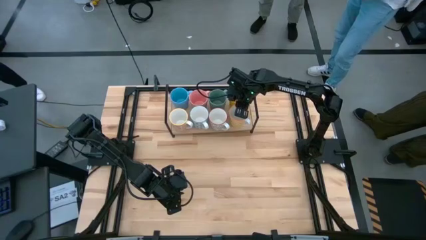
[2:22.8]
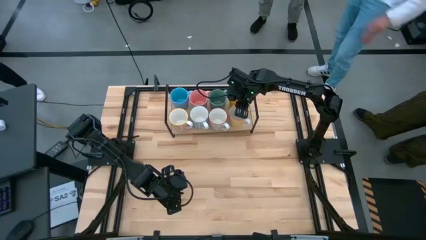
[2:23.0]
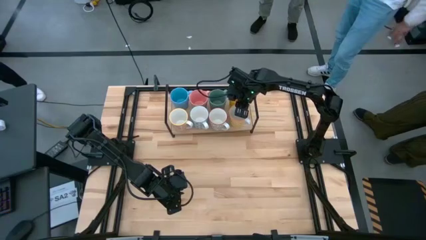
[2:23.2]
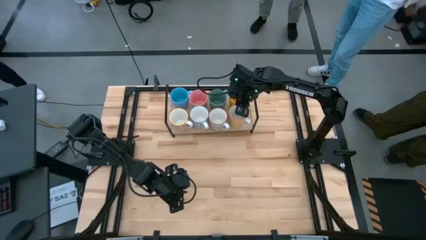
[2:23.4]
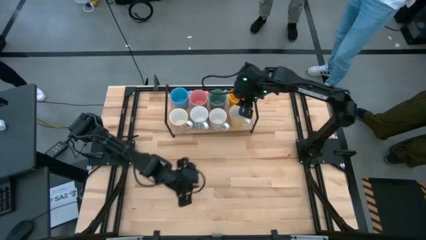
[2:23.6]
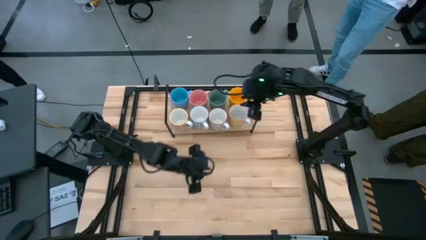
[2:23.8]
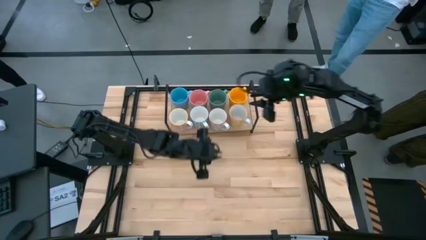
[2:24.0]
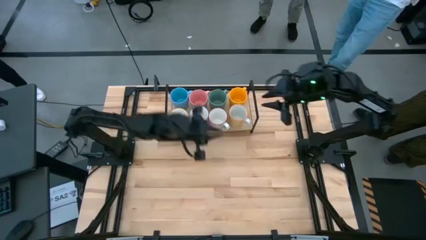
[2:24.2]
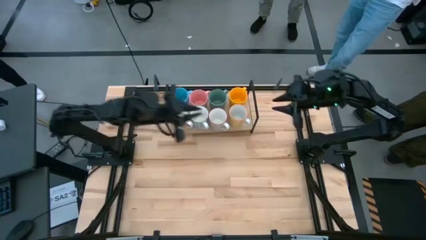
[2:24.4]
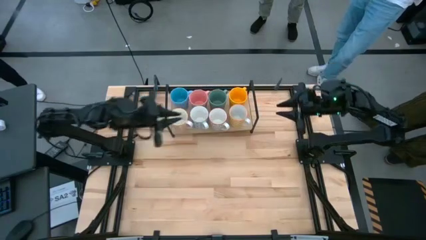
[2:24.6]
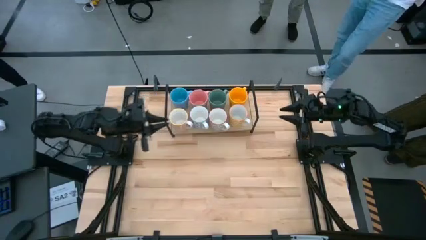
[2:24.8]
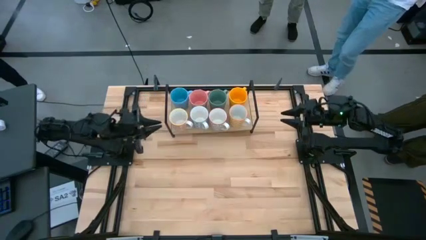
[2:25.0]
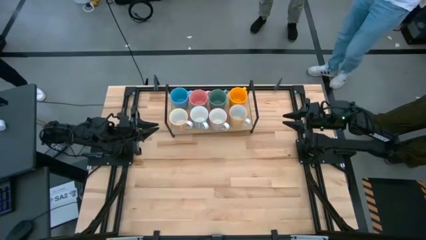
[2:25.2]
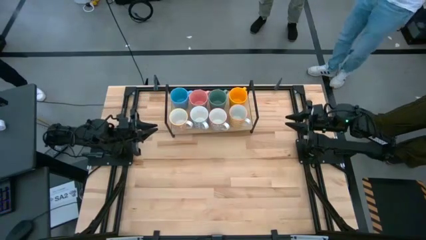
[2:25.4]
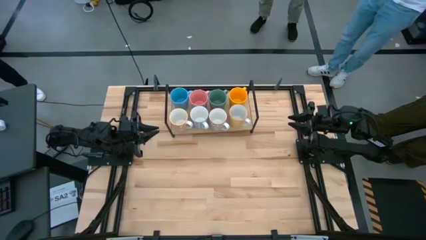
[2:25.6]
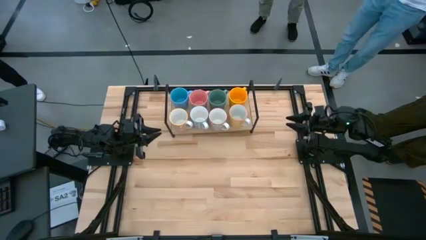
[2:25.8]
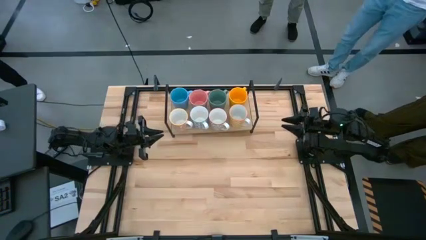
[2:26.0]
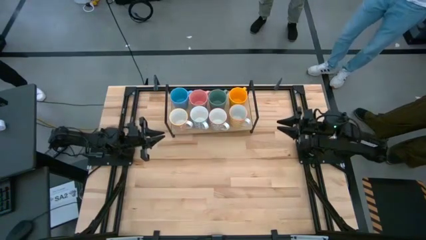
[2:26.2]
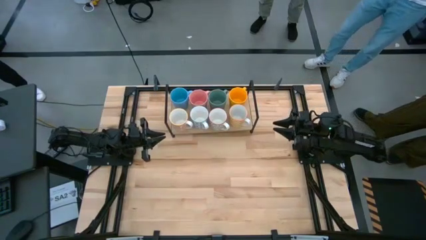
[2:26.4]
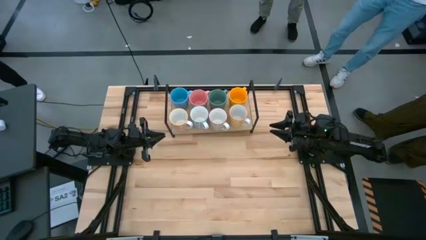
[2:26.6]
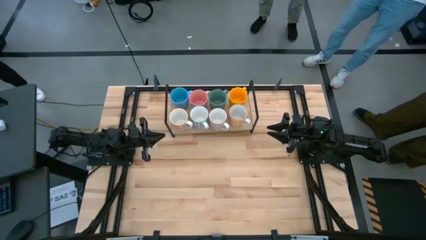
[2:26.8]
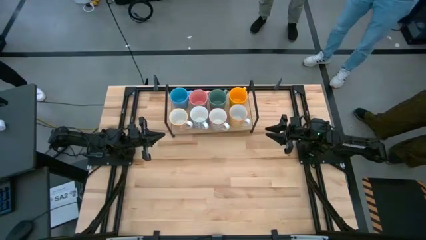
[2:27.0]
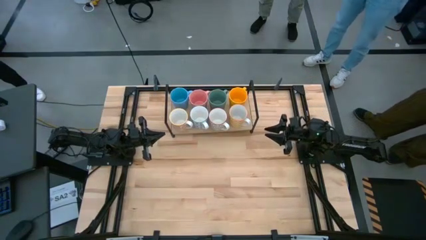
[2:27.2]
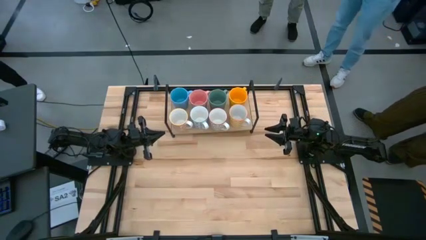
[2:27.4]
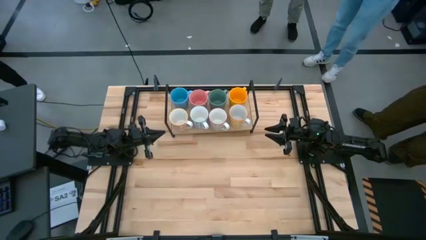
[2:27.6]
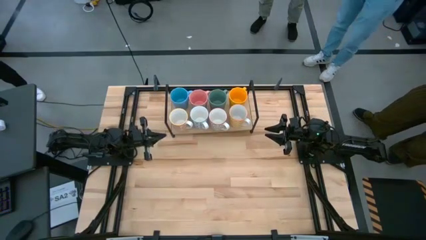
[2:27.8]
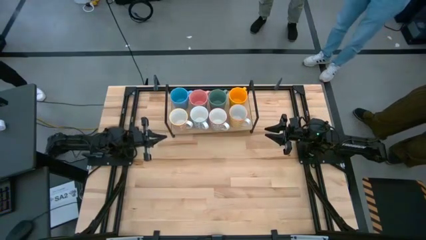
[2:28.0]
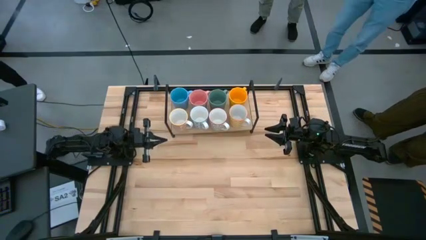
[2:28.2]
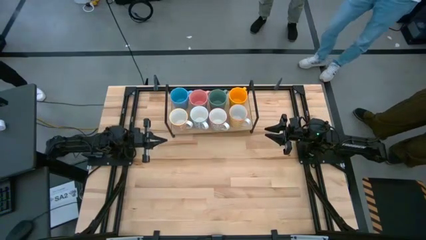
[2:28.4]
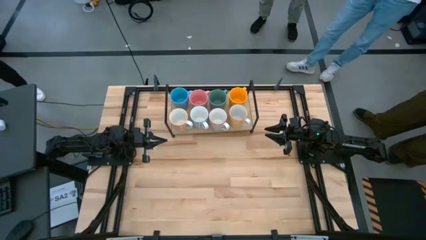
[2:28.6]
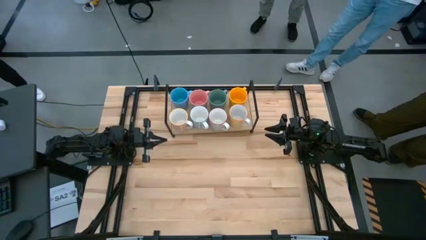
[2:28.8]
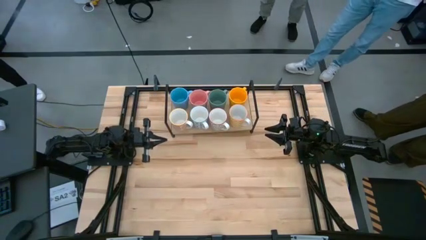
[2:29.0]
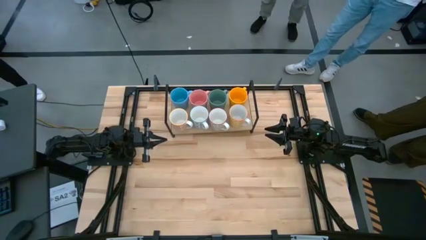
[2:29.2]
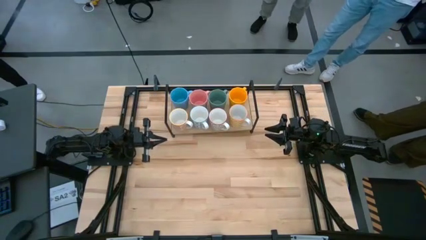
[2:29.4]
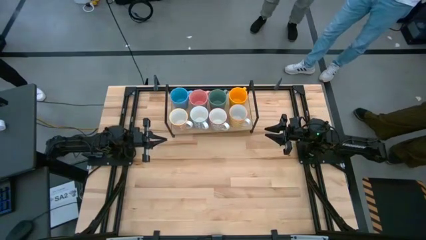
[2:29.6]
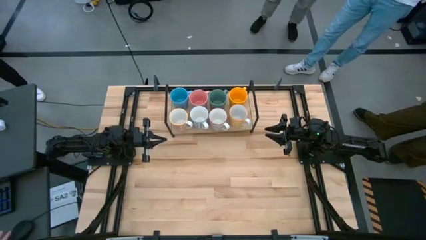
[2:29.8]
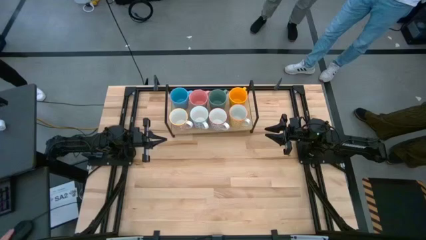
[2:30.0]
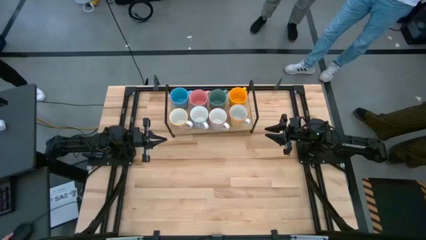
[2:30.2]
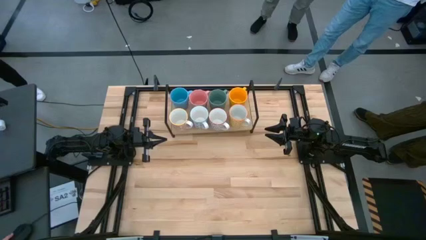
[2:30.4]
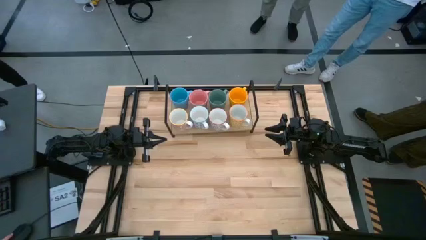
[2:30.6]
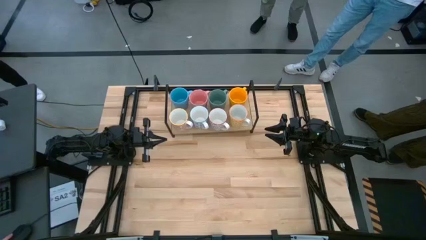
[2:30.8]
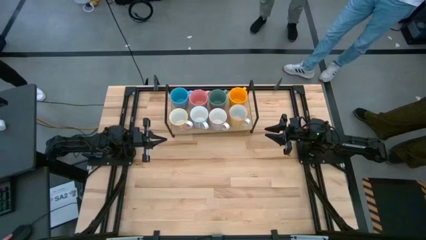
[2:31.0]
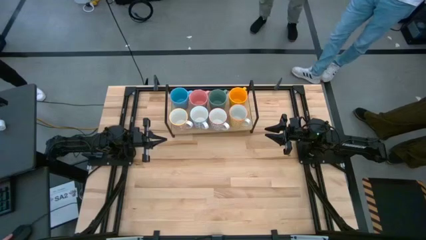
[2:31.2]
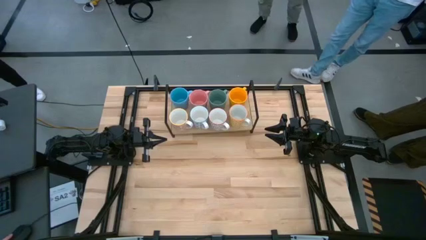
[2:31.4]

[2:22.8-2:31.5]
Task: Place coffee mugs
Return to Home Position

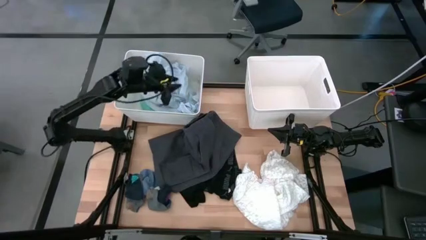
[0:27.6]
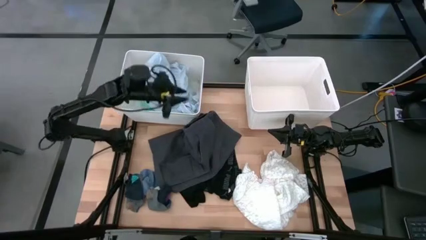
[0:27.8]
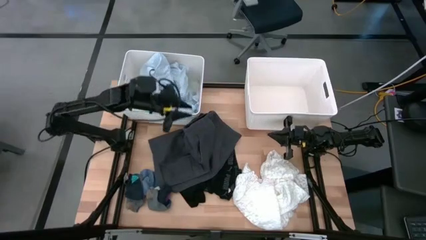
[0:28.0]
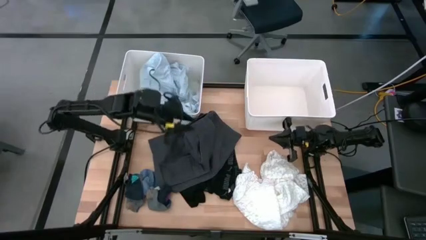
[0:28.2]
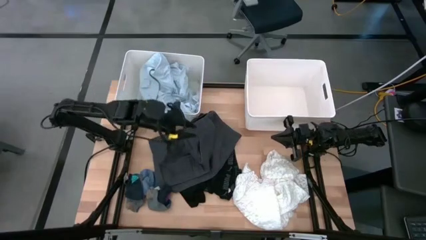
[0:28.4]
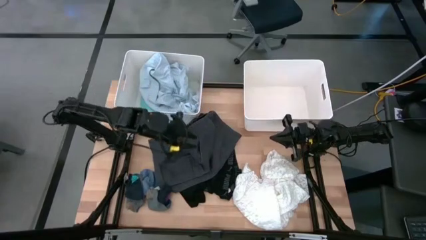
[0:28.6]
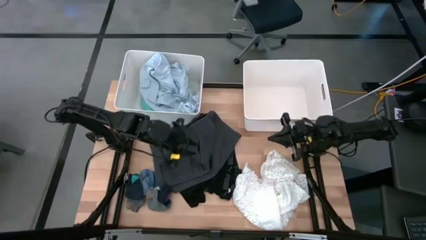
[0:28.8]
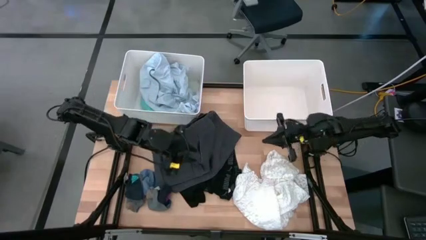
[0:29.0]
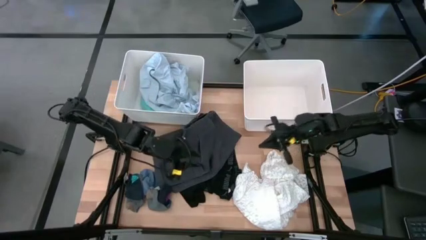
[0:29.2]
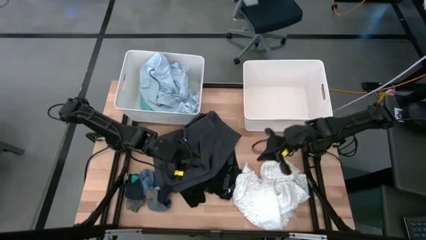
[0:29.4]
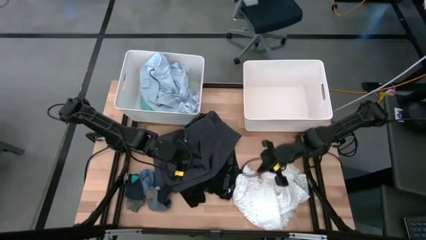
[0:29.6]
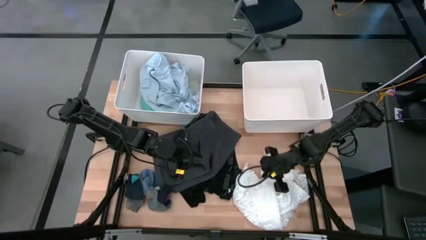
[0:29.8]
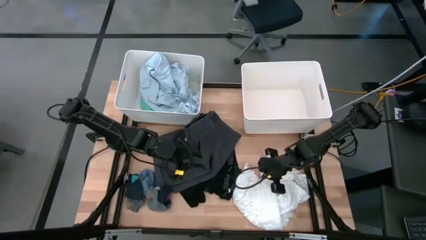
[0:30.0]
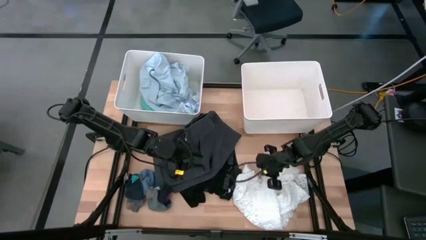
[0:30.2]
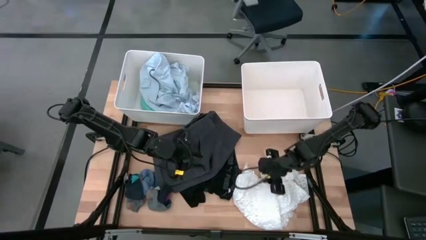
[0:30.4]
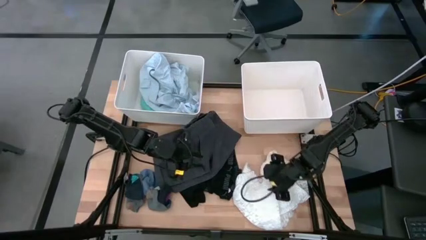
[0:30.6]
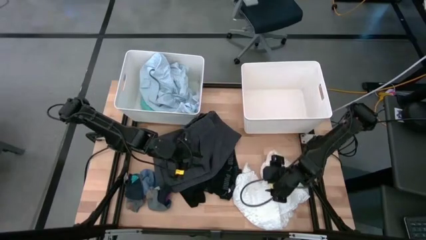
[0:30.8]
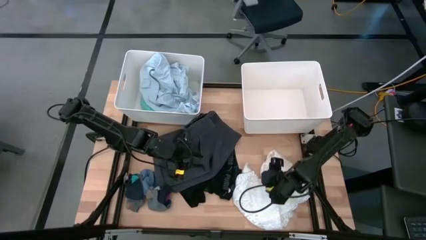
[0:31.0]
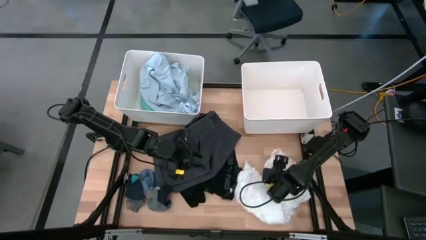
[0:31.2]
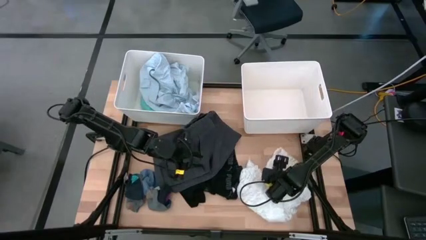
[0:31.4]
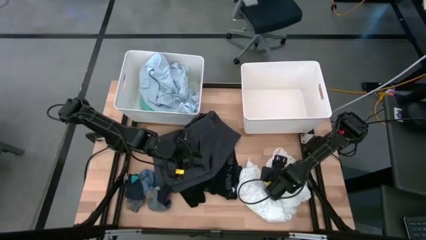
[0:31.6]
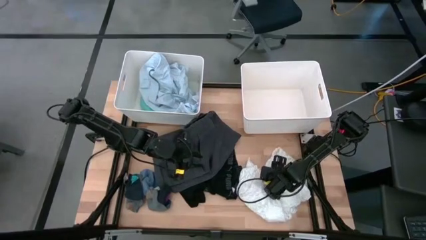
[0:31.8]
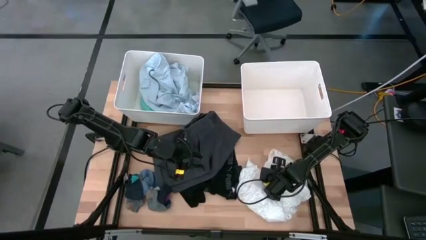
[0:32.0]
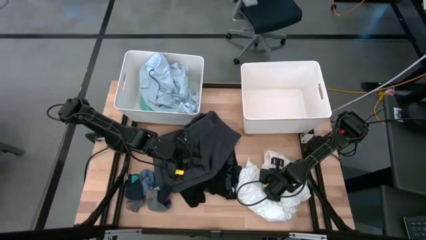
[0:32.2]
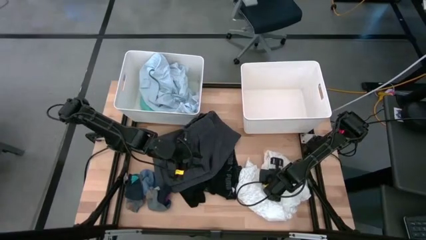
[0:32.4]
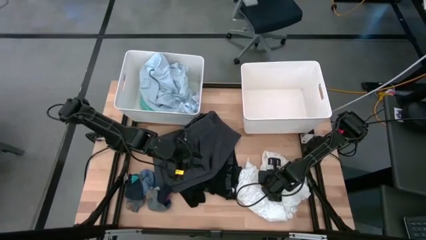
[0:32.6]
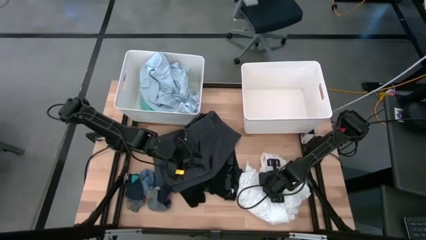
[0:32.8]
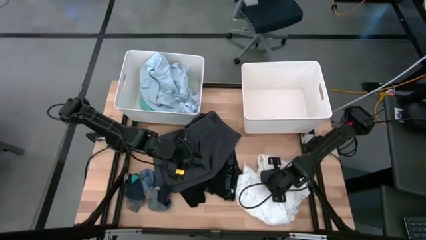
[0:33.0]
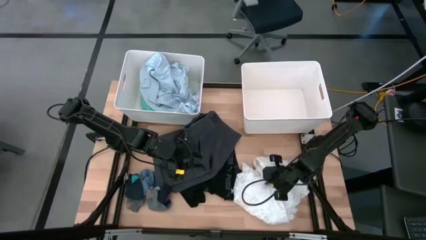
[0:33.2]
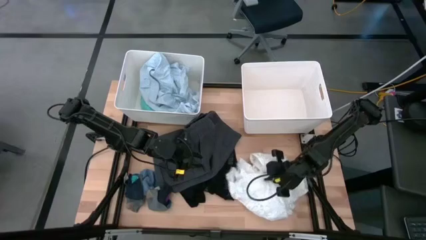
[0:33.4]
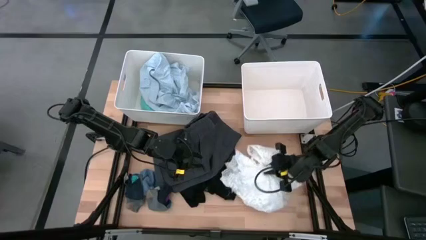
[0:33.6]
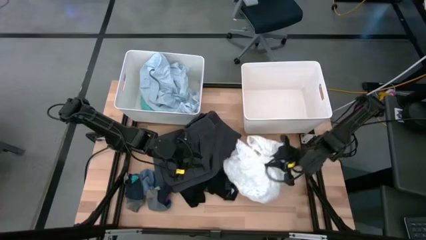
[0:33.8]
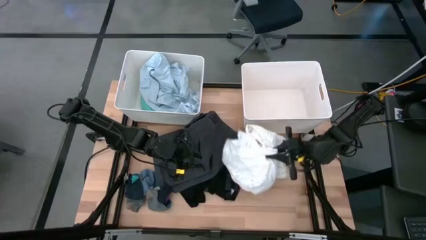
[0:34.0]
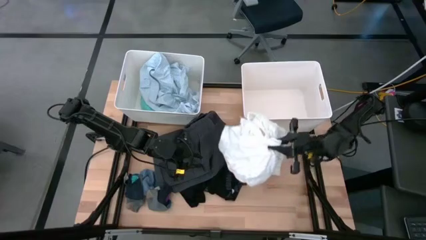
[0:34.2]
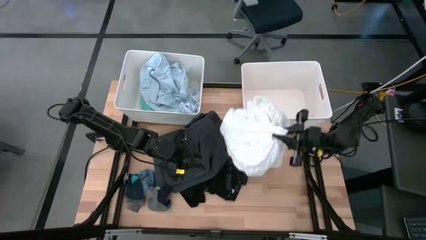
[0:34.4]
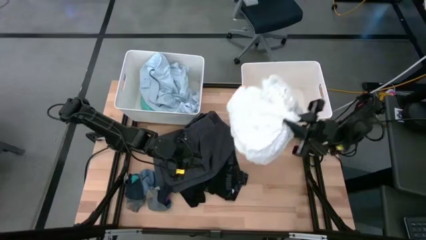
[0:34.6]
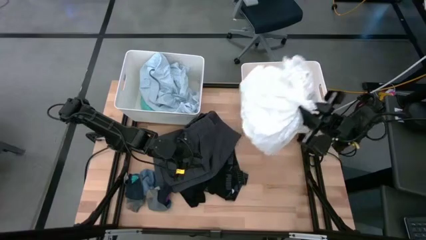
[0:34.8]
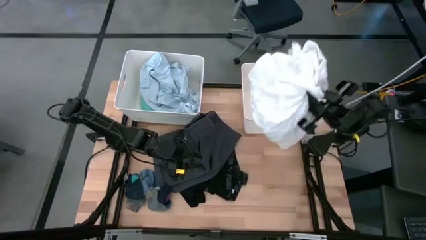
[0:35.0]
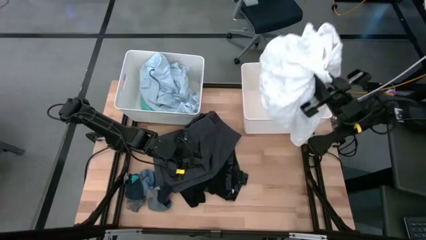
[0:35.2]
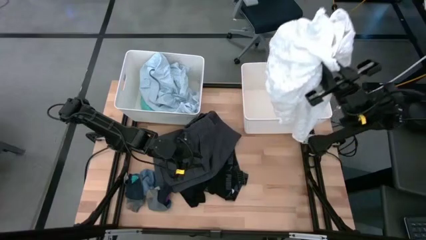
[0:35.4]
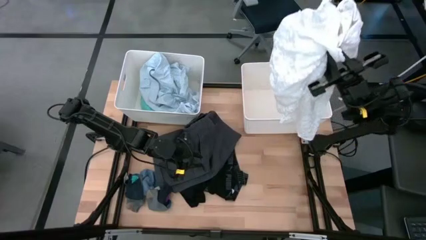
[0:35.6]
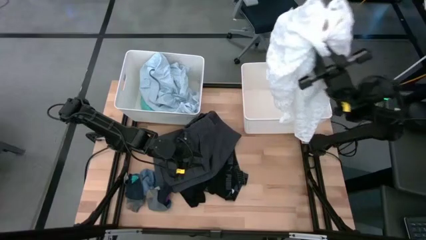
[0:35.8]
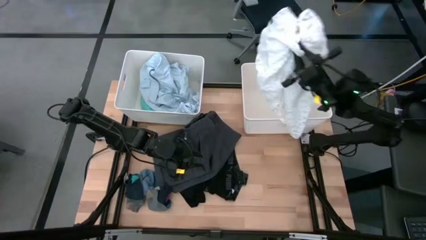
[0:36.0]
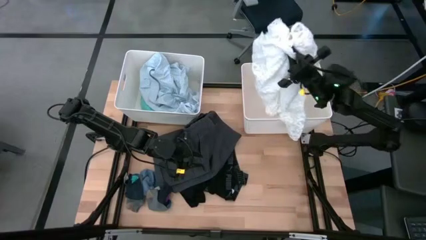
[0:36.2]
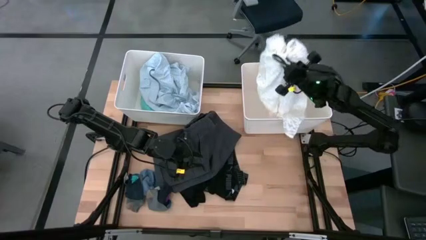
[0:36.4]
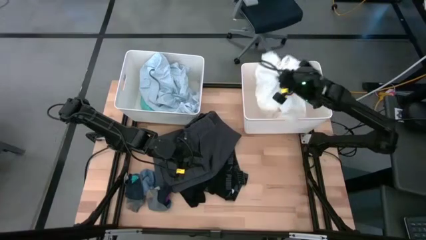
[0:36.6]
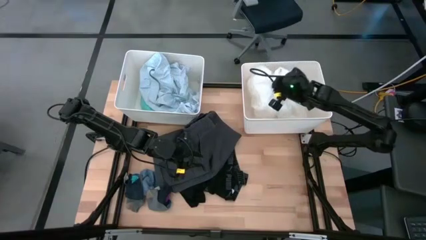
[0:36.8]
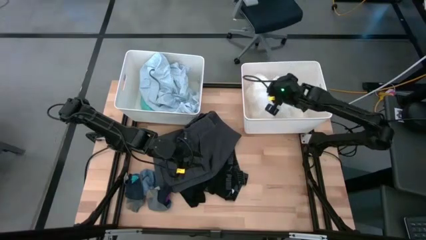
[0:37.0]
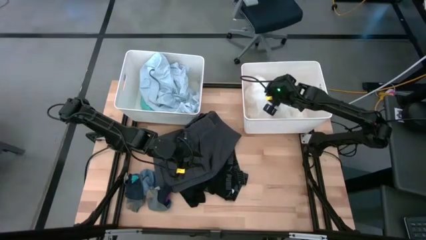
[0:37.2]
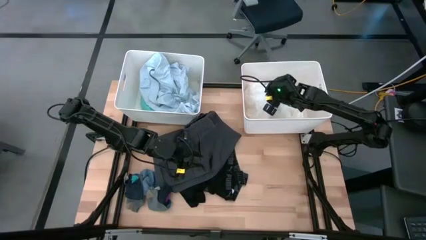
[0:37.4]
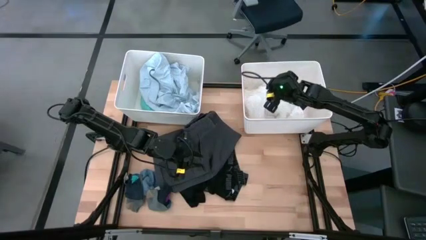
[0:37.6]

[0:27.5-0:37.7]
Task: Sort clothes
Put the white shirt into the right white laundry bin
